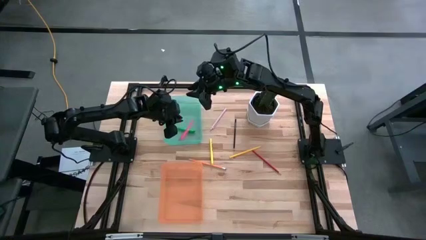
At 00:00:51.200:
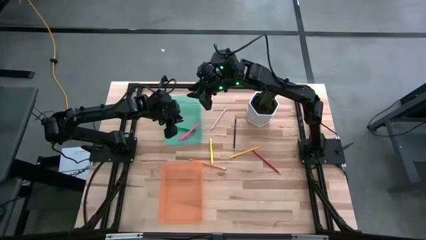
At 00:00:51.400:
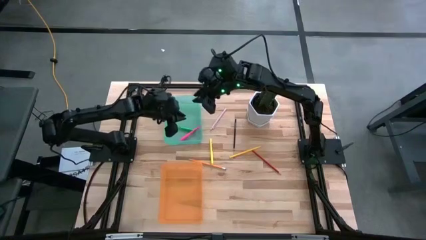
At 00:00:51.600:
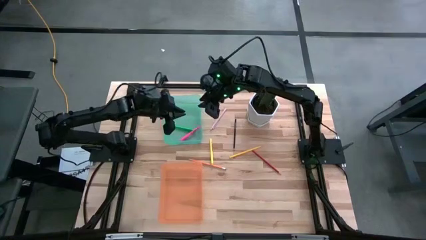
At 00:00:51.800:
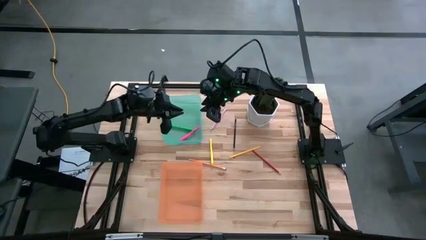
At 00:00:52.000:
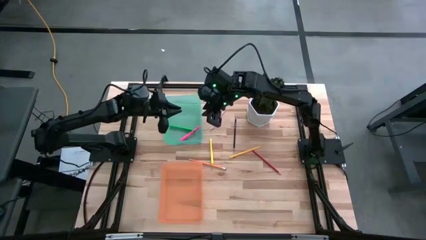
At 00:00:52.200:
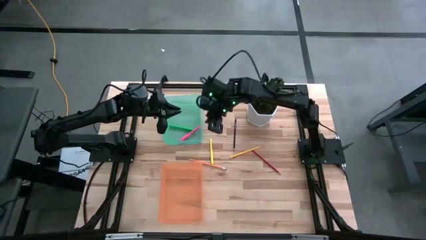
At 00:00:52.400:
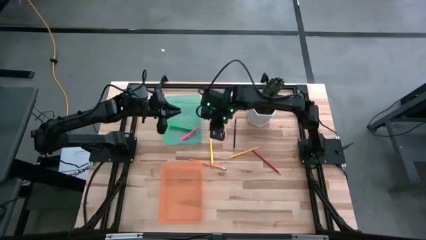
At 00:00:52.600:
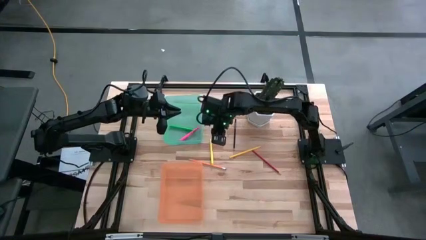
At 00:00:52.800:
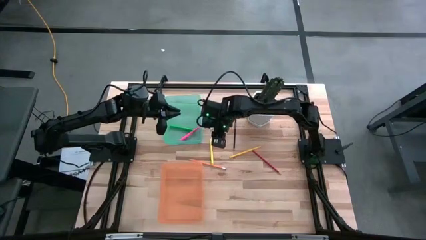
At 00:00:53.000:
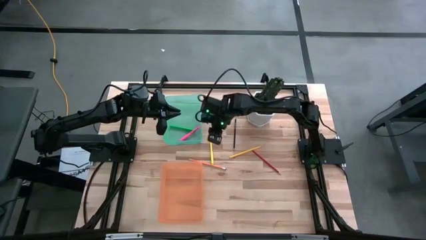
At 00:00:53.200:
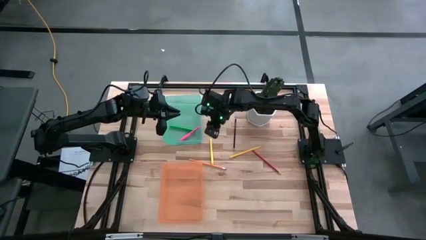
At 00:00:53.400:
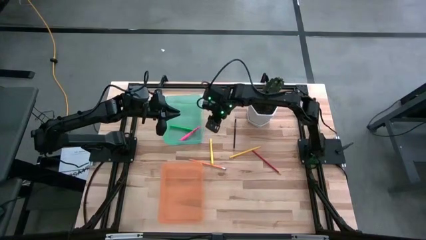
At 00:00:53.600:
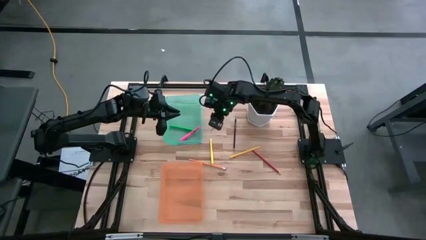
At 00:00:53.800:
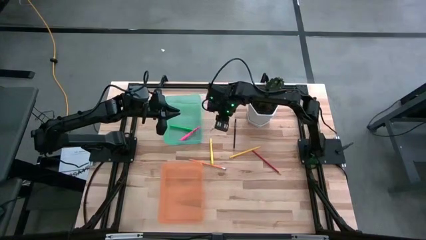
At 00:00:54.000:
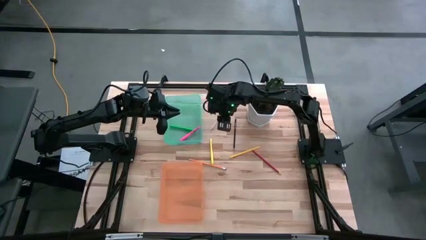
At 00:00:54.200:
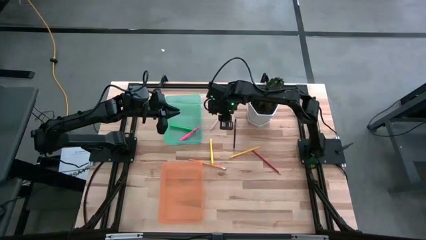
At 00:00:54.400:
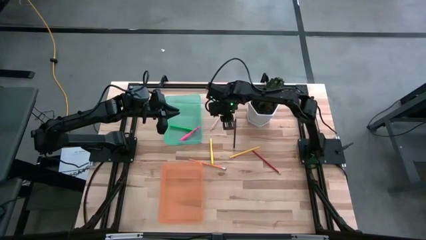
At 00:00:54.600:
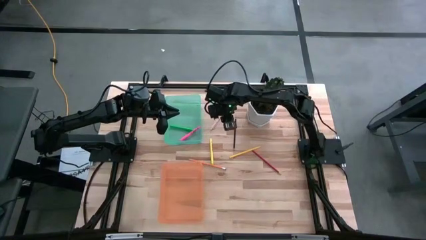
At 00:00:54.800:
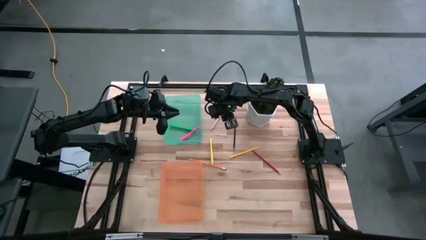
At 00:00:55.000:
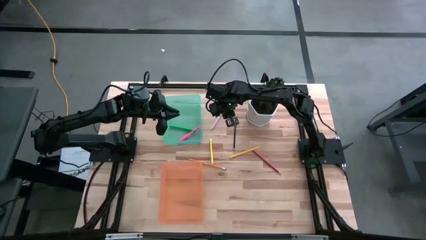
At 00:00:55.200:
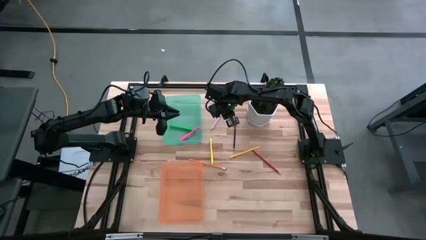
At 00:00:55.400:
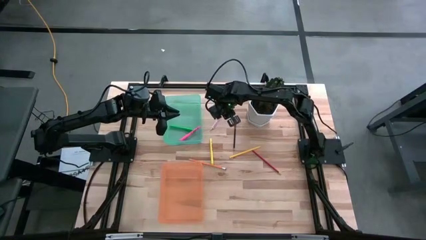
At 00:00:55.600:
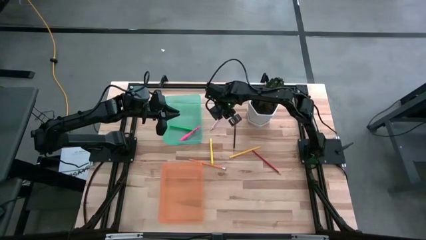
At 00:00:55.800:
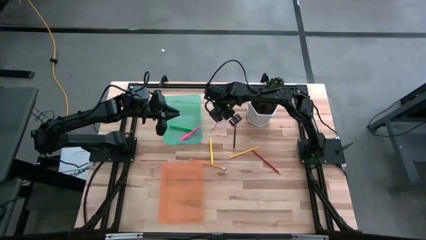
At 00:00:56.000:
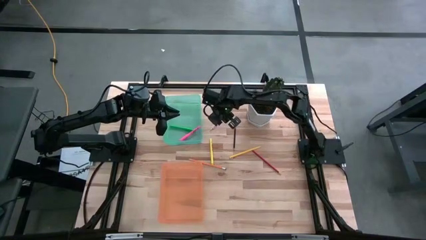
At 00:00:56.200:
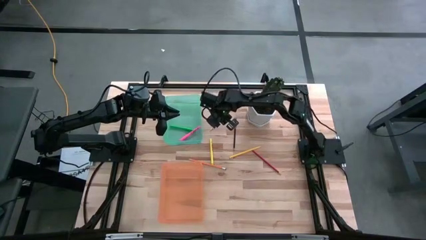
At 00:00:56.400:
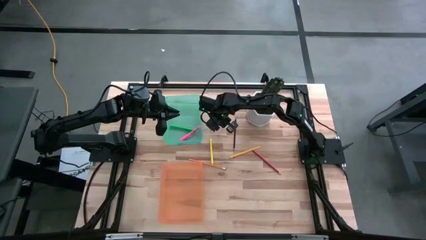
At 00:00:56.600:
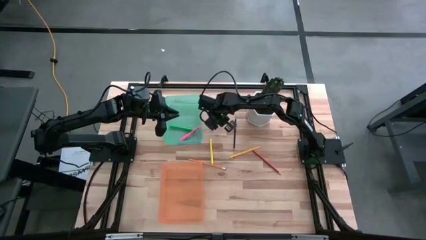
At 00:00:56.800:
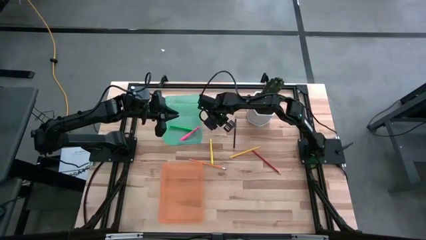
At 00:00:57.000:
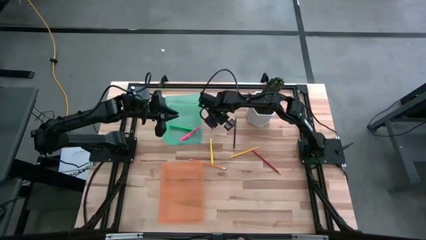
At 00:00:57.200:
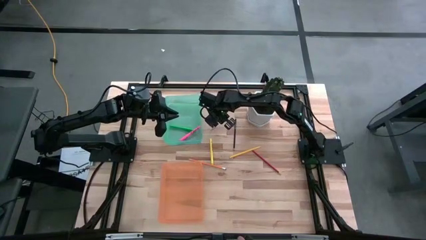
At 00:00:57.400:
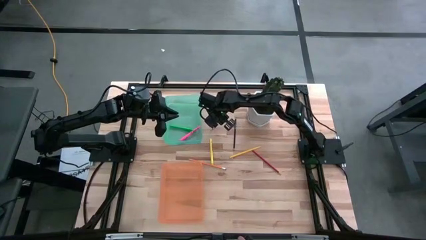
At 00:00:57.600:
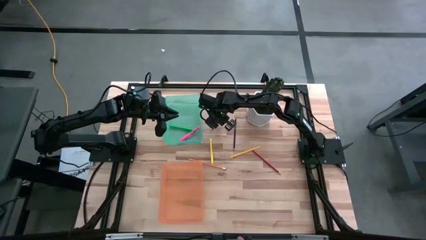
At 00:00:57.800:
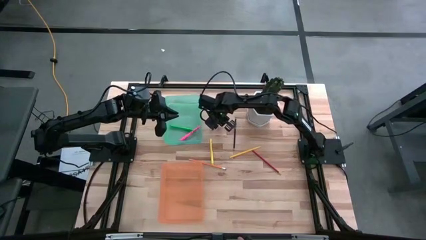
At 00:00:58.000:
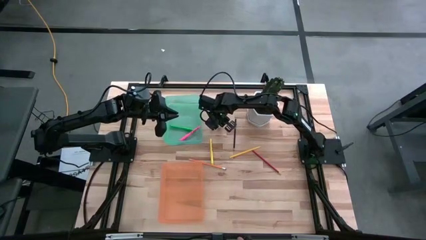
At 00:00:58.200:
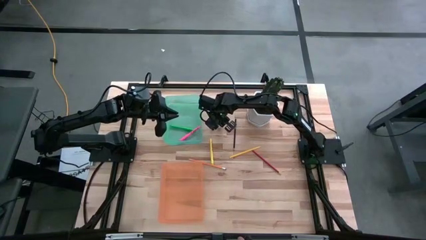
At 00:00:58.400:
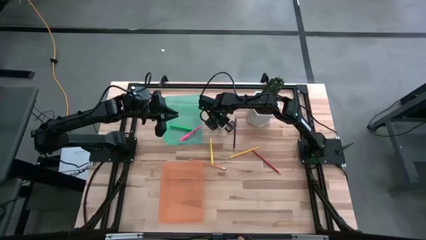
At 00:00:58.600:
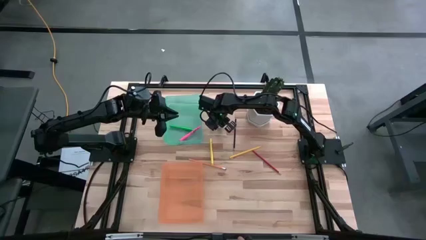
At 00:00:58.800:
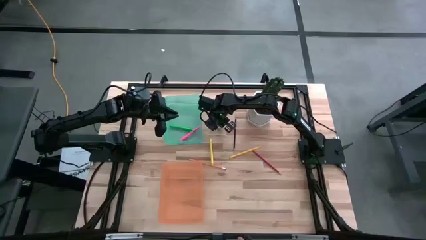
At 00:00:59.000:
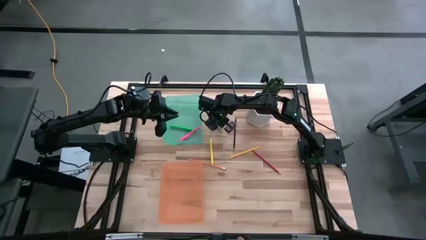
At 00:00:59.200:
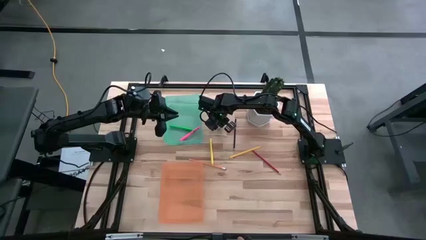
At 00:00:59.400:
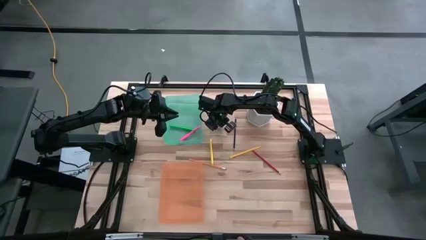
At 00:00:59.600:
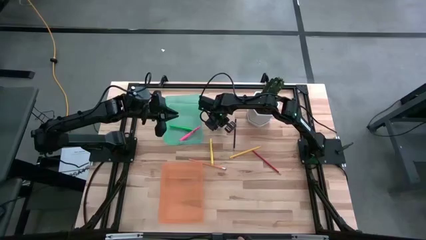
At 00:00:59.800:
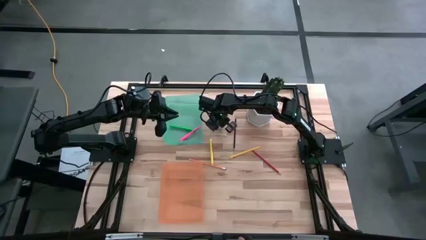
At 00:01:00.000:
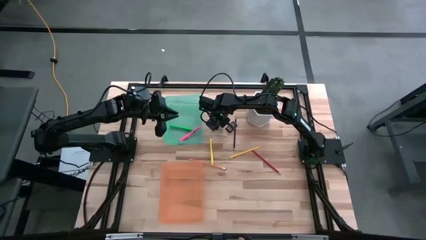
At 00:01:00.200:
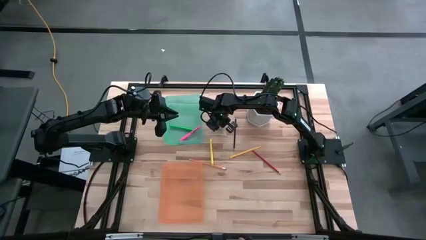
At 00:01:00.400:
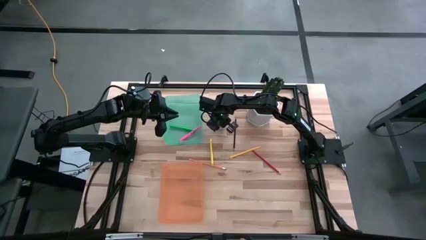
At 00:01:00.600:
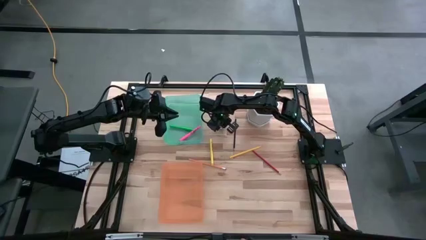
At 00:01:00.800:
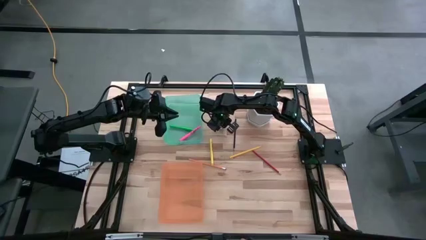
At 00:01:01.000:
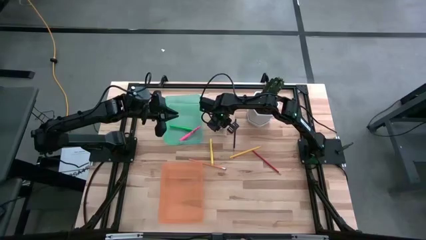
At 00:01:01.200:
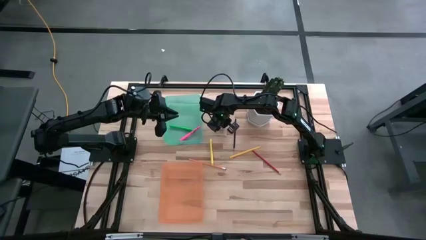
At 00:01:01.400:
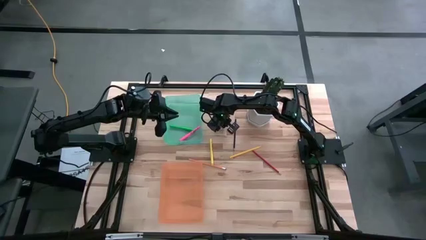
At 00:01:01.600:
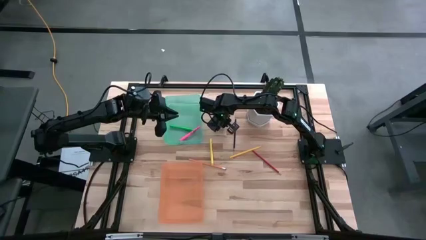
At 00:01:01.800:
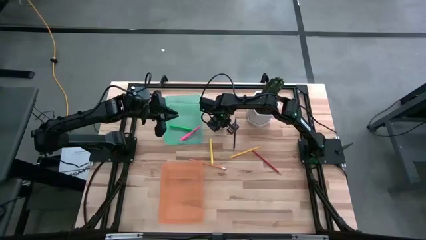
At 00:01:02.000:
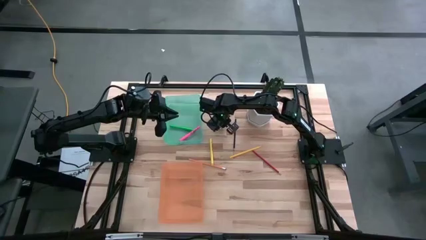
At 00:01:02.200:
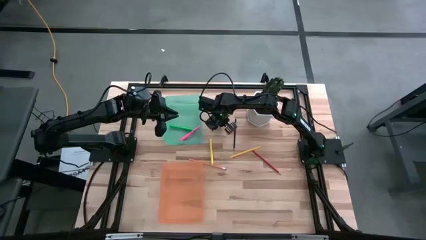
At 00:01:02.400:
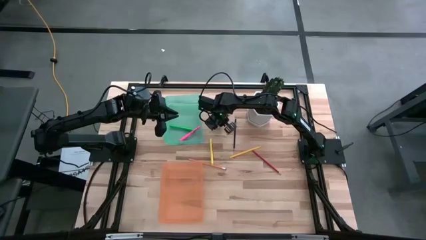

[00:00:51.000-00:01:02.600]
Task: Sort pens & pencils
Put the pink pen into the green bin
